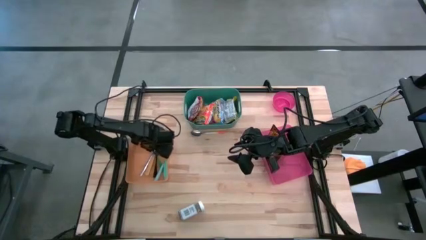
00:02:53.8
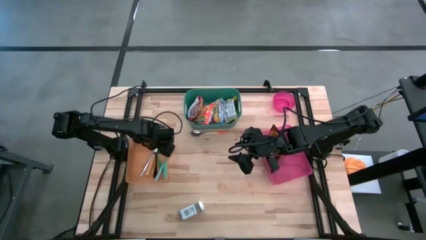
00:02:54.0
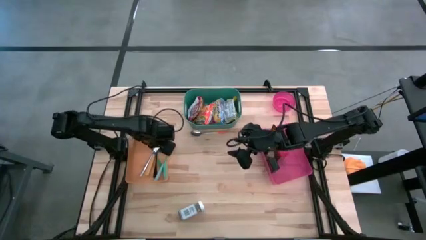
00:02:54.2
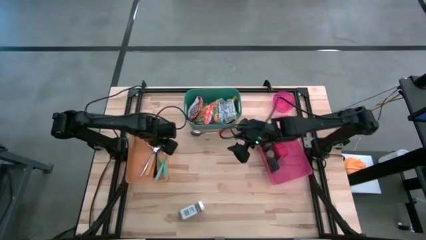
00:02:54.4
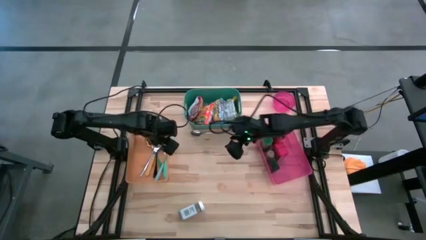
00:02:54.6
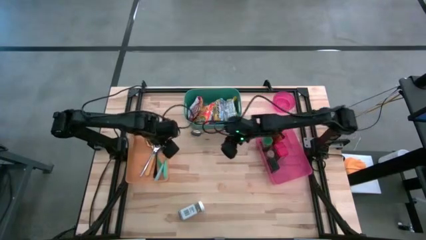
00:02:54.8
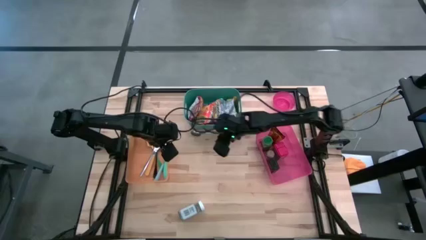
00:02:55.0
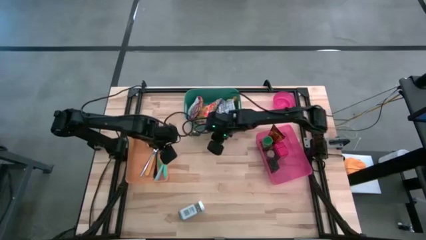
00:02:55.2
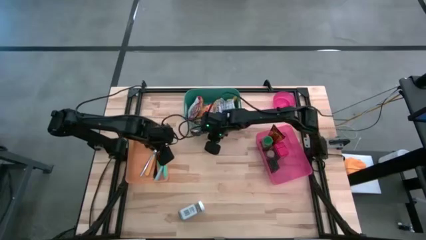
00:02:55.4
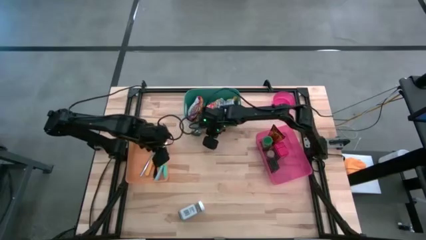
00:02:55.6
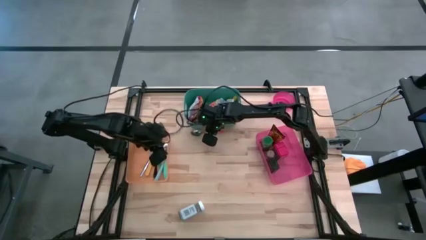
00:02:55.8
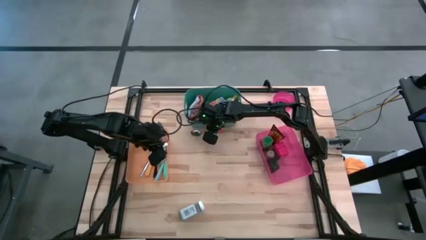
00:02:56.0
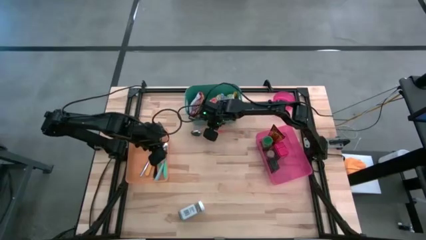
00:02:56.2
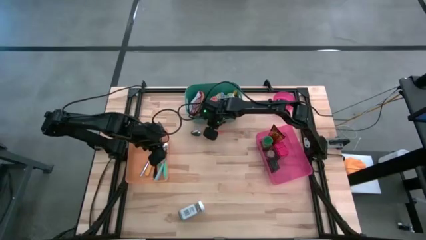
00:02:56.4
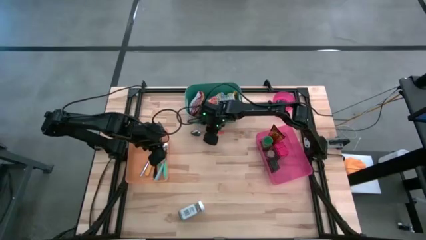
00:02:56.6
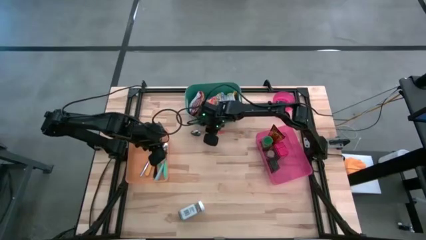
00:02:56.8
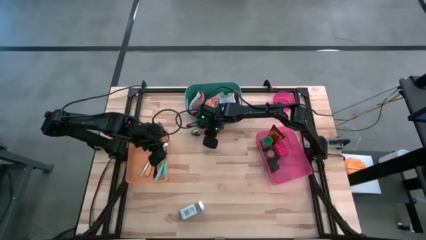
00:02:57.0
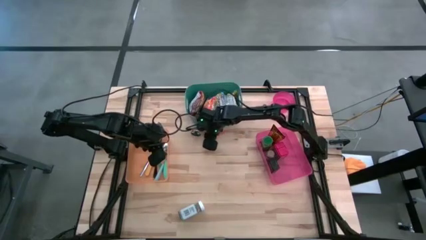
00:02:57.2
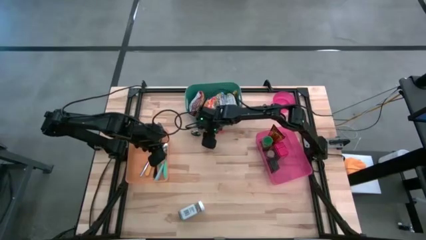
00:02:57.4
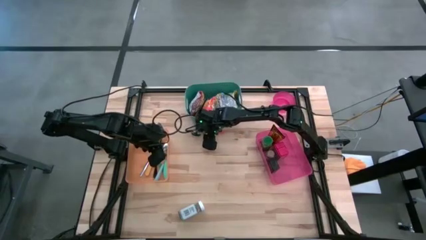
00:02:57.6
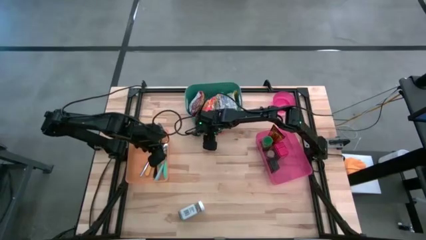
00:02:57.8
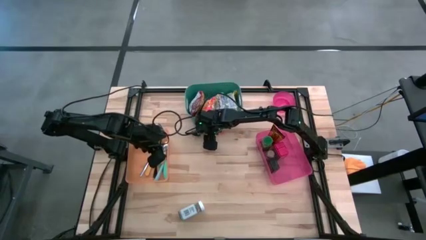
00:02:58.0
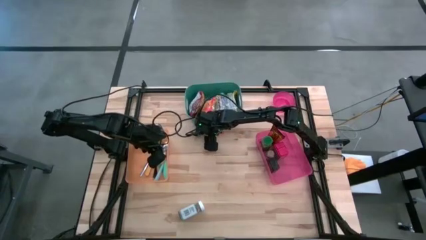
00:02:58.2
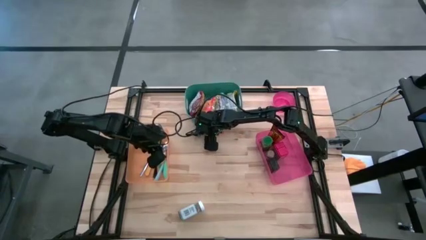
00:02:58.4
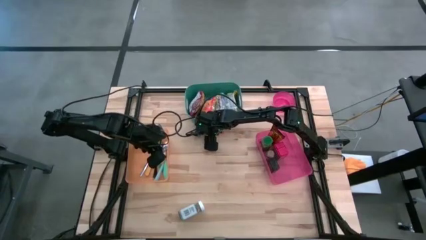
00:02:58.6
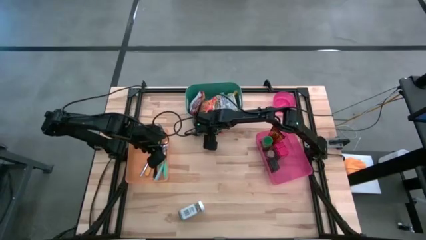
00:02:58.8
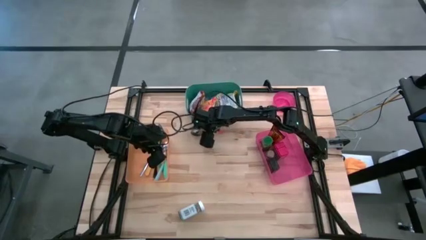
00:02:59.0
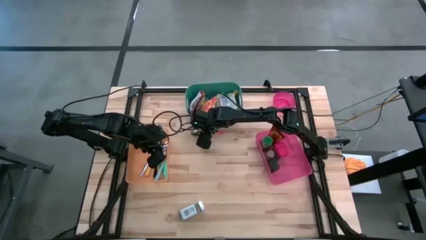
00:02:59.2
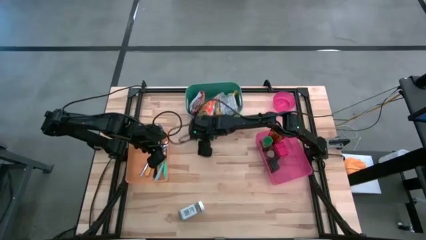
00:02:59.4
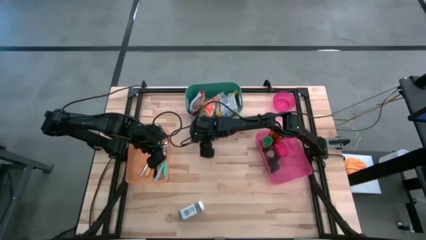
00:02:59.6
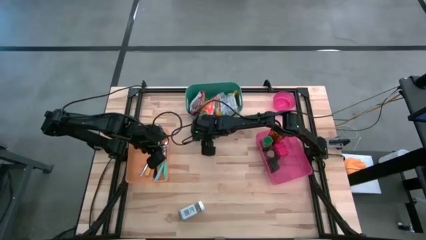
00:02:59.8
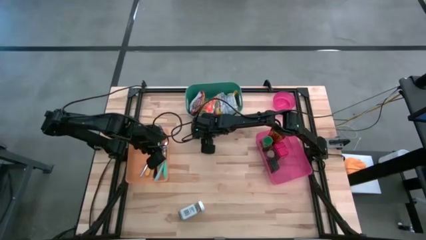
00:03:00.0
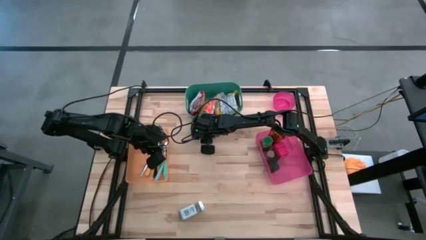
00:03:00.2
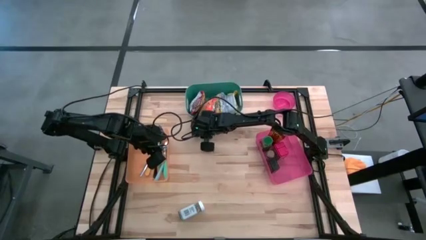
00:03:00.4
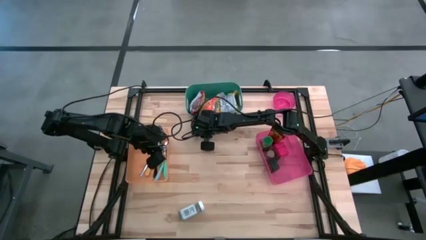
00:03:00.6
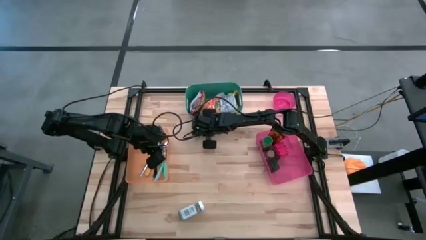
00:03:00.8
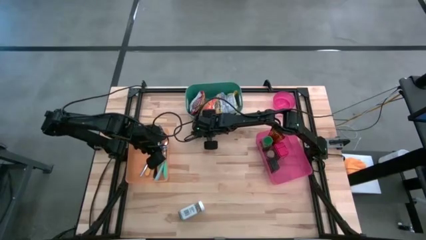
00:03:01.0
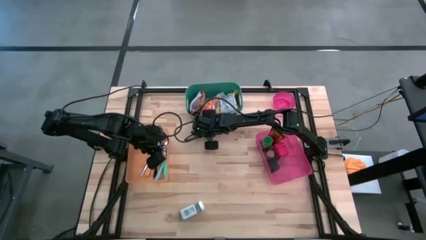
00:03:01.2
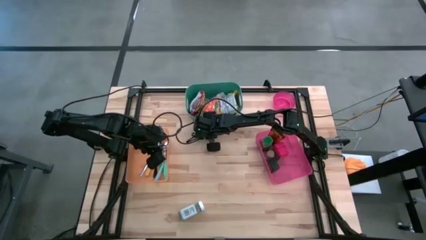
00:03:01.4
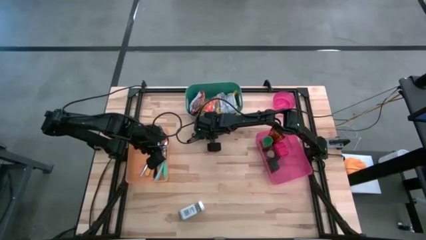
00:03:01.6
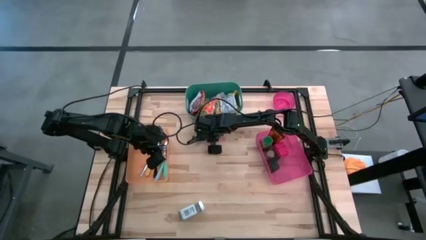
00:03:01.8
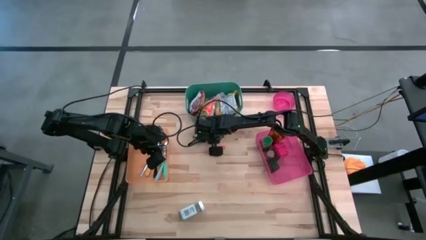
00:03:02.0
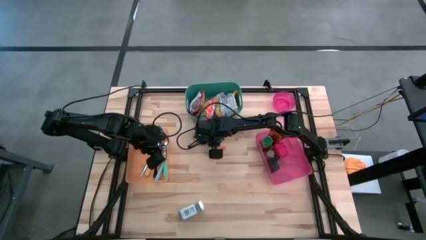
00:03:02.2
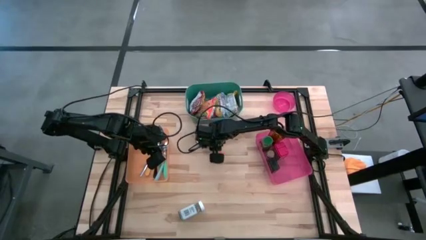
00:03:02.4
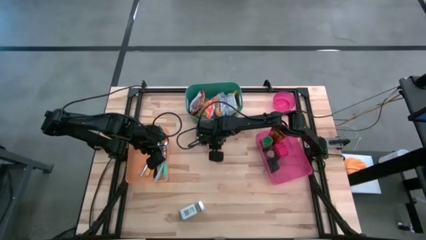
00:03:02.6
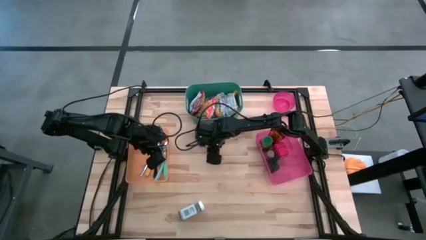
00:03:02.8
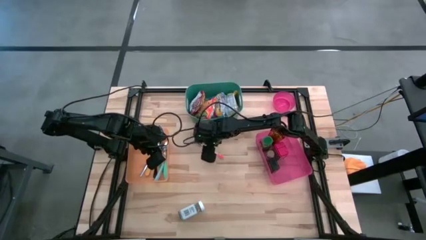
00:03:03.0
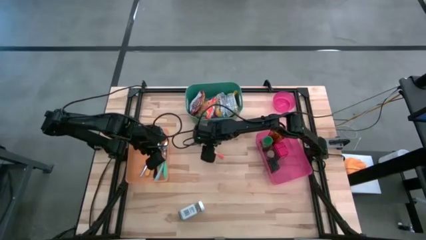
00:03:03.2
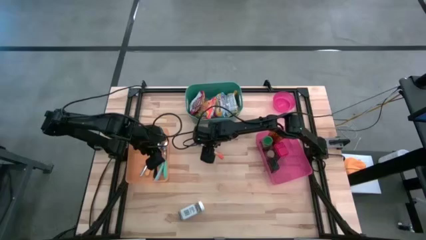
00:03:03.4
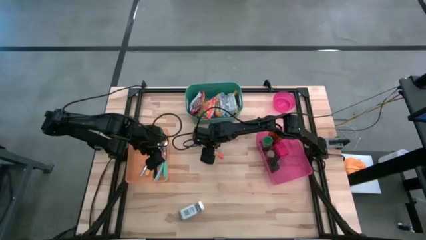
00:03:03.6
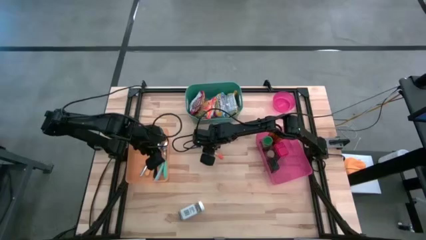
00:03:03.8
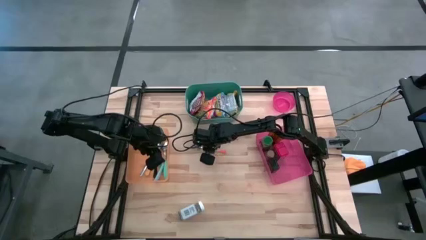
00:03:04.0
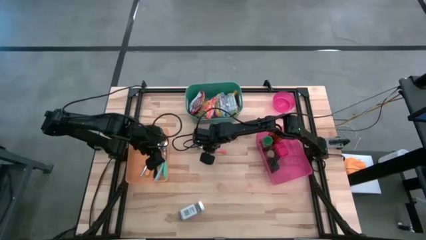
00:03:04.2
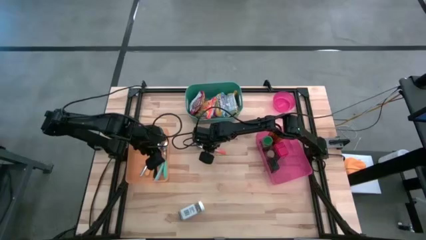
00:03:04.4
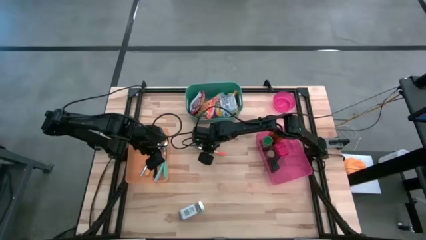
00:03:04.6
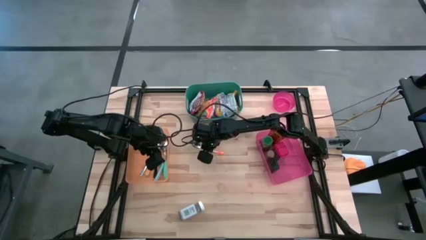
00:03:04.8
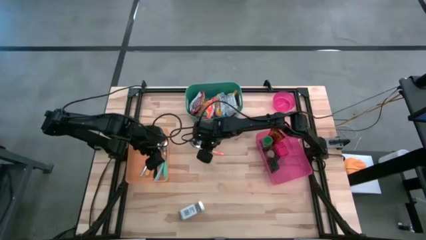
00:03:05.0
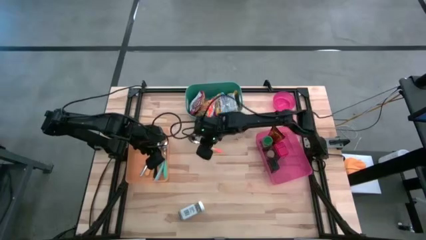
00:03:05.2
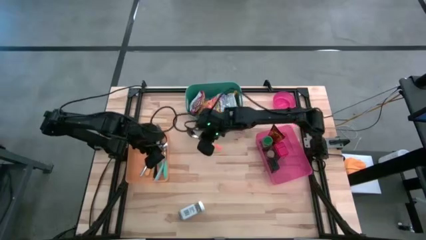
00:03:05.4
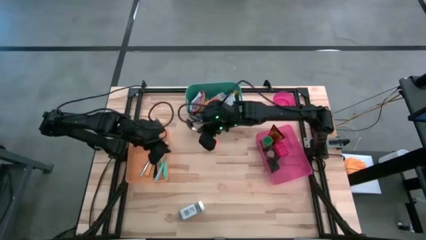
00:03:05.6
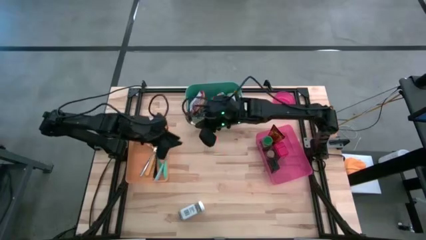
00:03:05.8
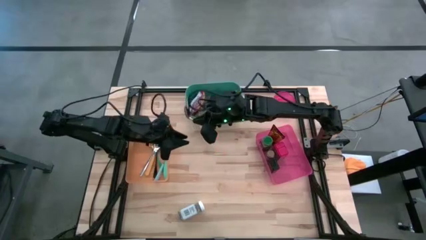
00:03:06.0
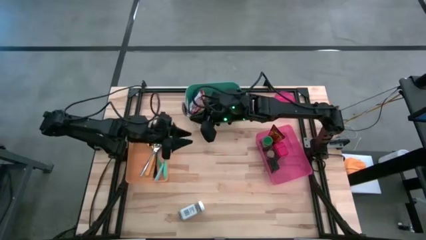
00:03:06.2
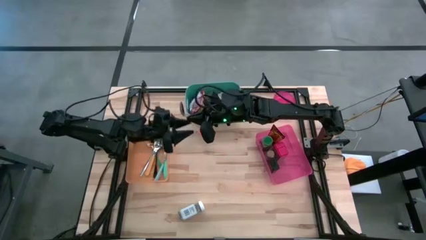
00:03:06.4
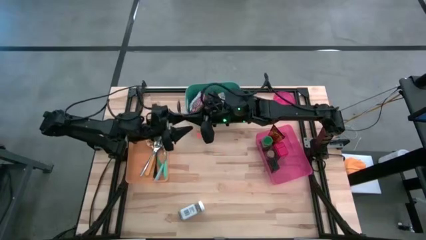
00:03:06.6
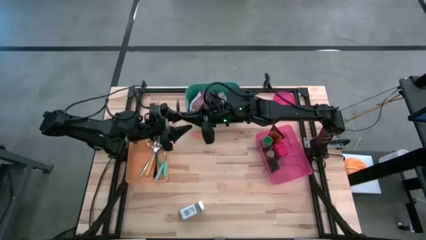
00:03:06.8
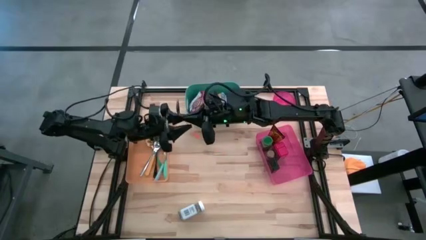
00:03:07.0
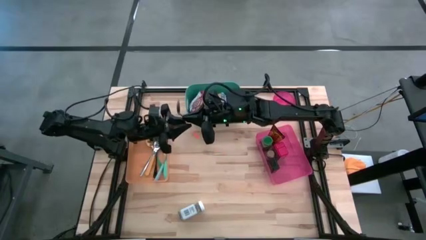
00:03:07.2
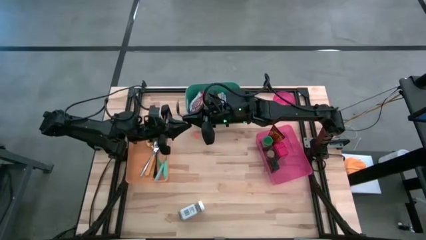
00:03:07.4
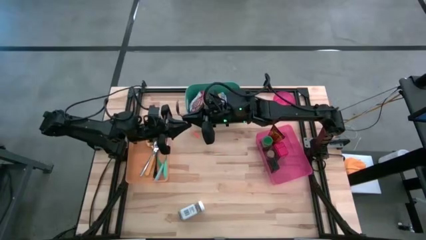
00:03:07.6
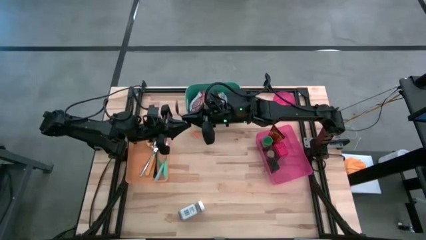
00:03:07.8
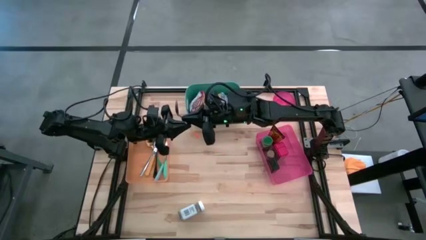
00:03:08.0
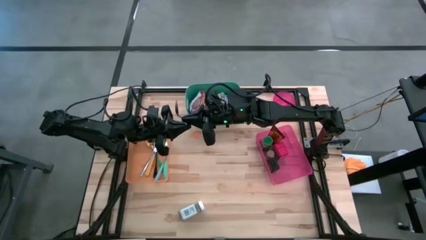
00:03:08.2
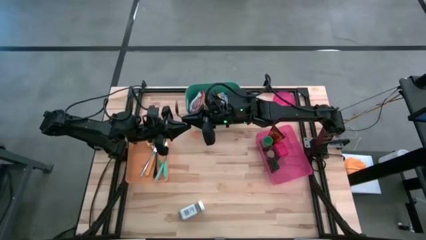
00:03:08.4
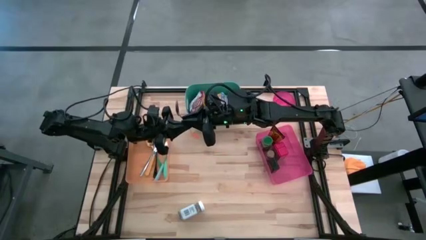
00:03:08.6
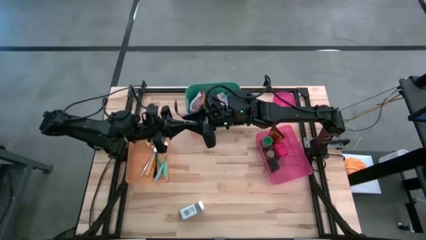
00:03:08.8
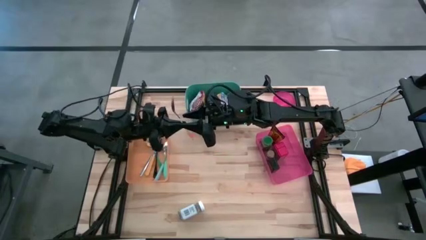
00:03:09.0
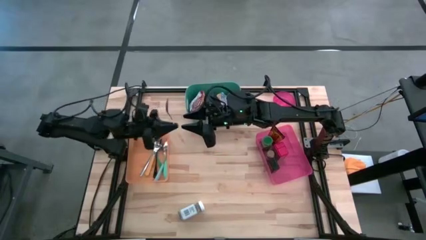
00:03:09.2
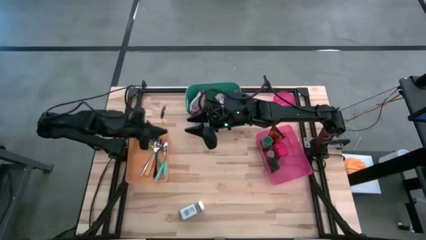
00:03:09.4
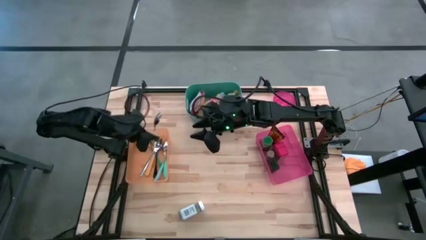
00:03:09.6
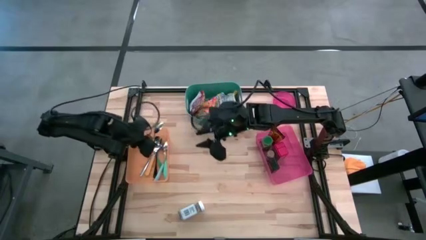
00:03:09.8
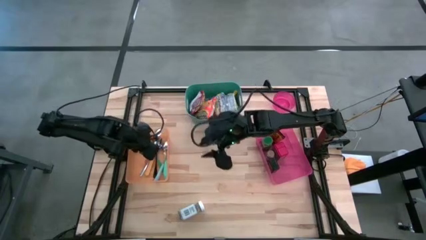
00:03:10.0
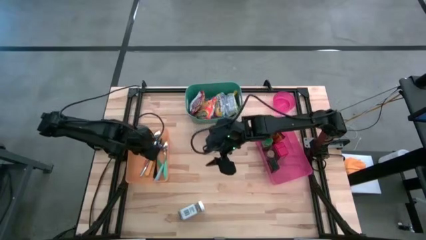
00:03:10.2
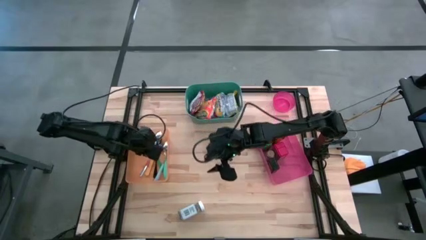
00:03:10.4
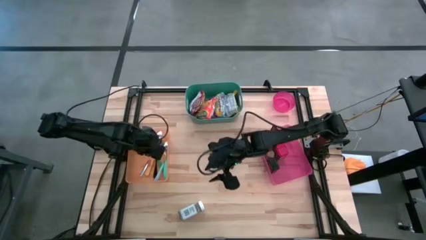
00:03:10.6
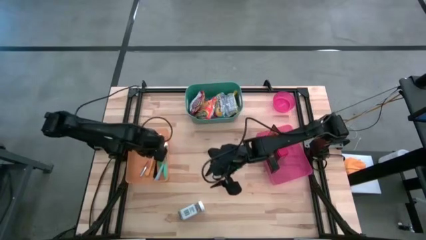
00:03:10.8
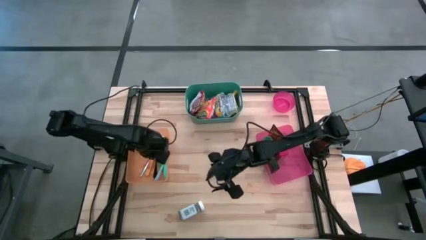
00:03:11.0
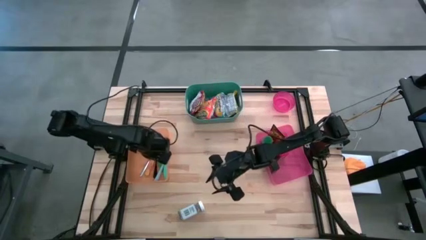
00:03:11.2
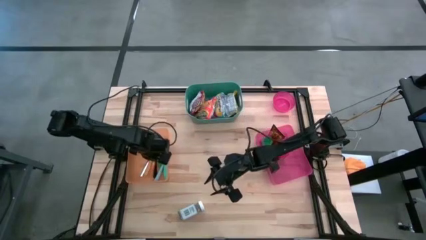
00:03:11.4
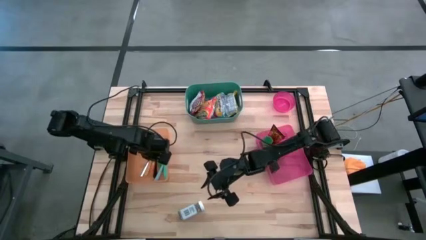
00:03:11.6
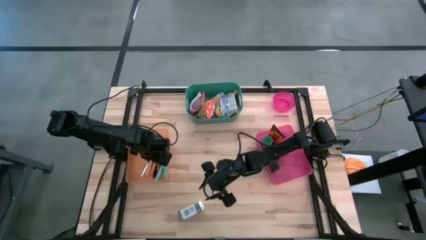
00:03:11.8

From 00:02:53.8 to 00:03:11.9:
Put the orange spoon into the orange bin
